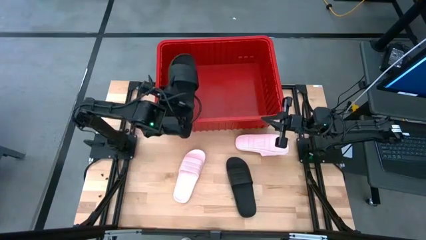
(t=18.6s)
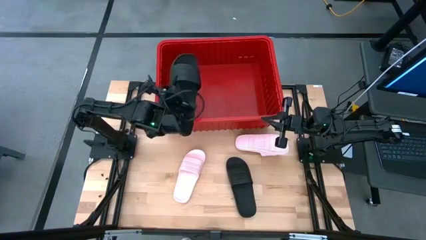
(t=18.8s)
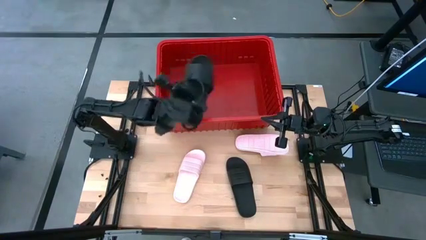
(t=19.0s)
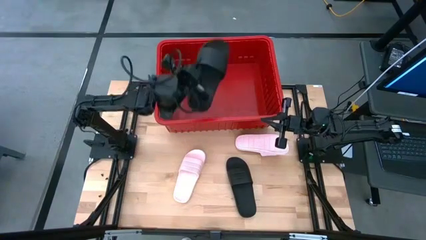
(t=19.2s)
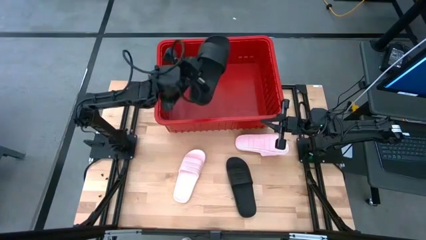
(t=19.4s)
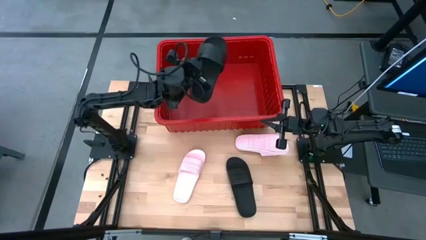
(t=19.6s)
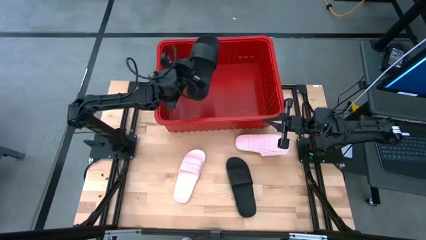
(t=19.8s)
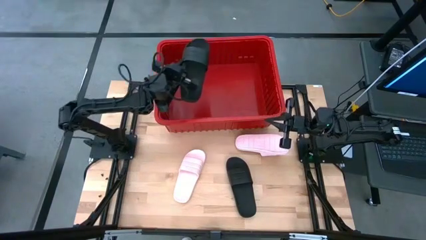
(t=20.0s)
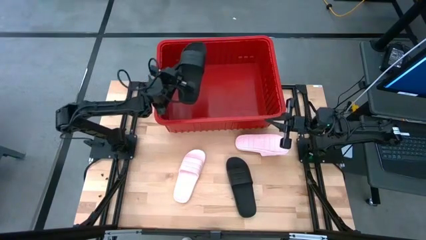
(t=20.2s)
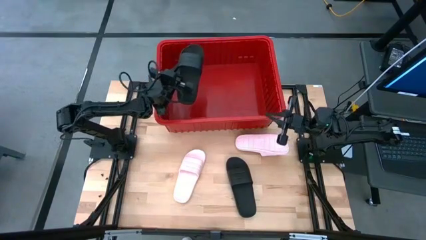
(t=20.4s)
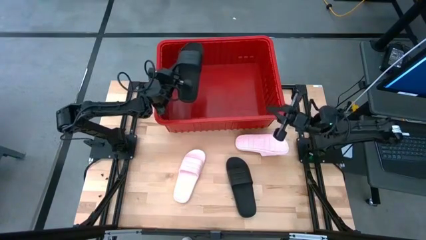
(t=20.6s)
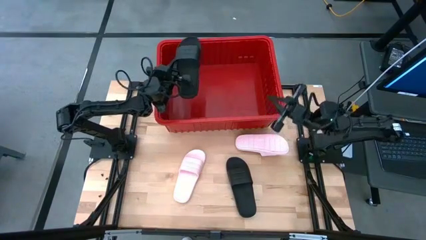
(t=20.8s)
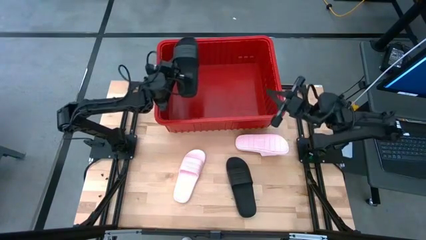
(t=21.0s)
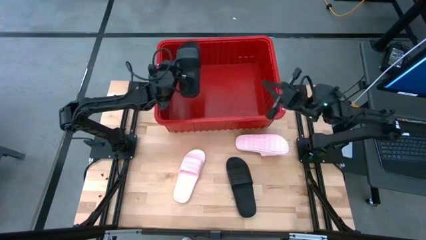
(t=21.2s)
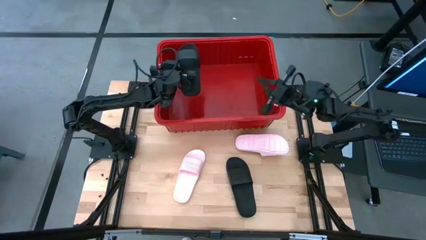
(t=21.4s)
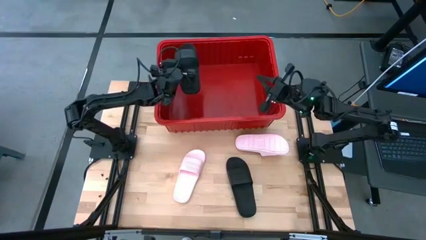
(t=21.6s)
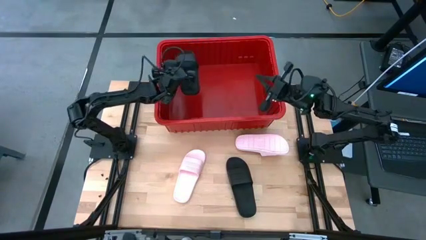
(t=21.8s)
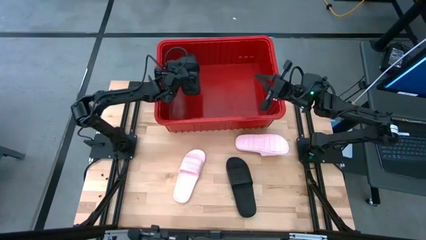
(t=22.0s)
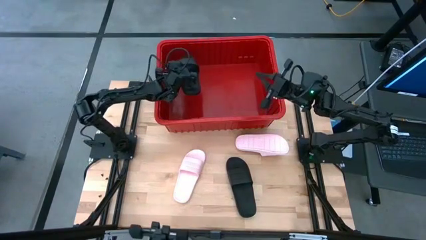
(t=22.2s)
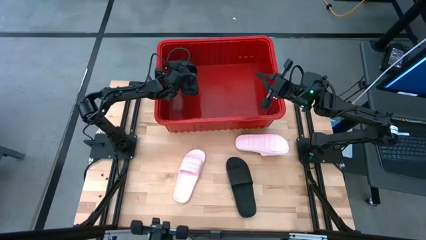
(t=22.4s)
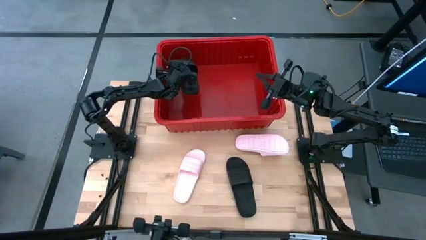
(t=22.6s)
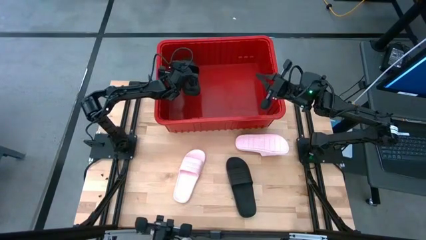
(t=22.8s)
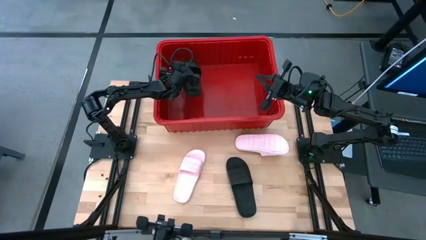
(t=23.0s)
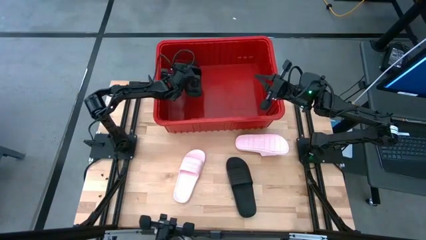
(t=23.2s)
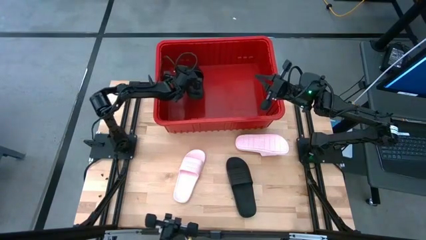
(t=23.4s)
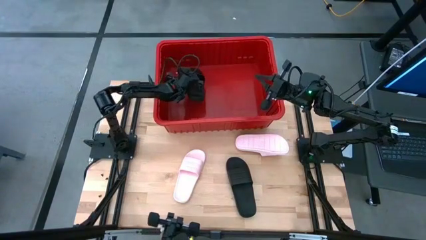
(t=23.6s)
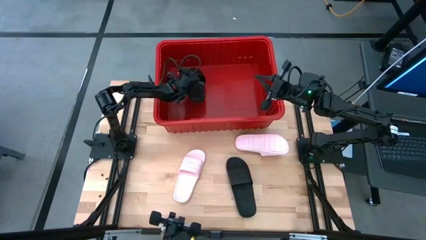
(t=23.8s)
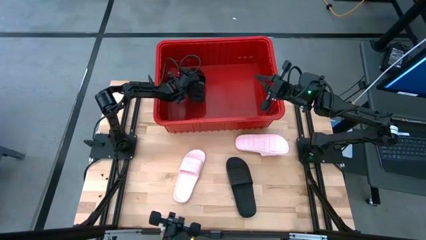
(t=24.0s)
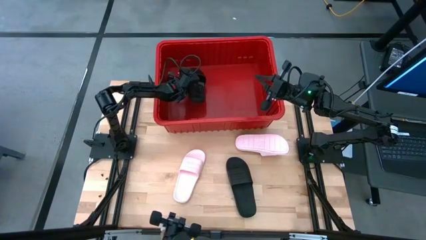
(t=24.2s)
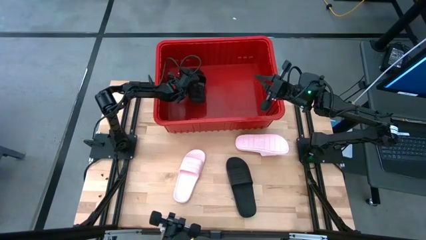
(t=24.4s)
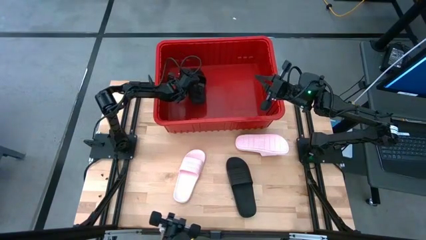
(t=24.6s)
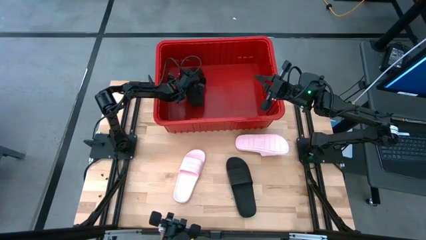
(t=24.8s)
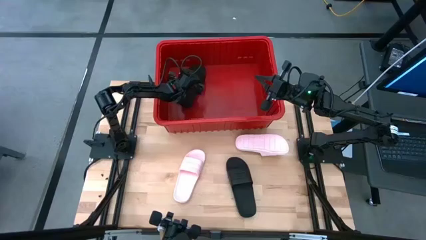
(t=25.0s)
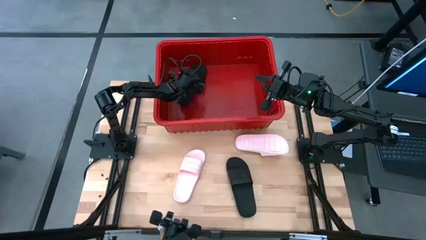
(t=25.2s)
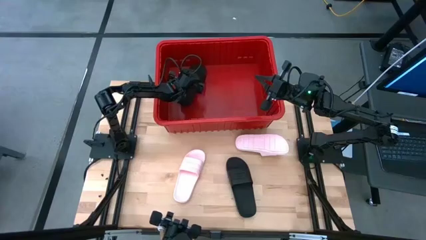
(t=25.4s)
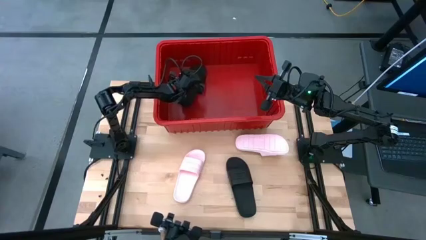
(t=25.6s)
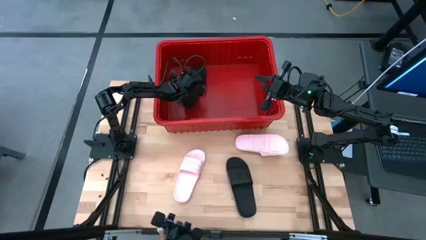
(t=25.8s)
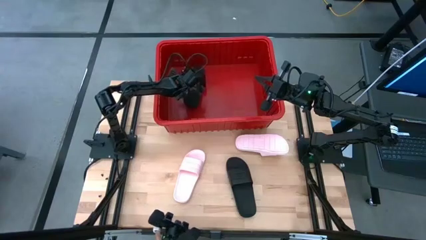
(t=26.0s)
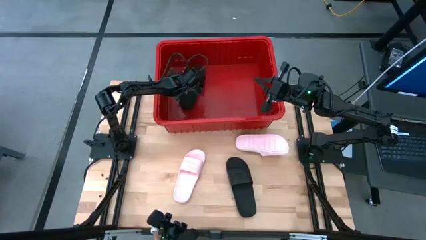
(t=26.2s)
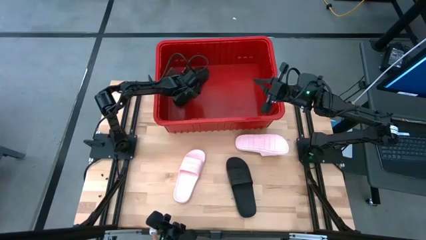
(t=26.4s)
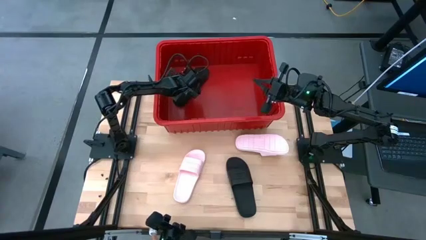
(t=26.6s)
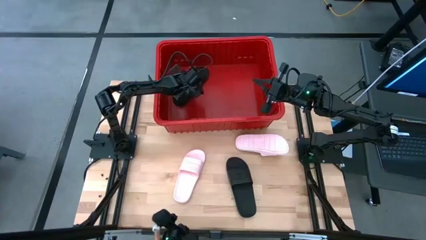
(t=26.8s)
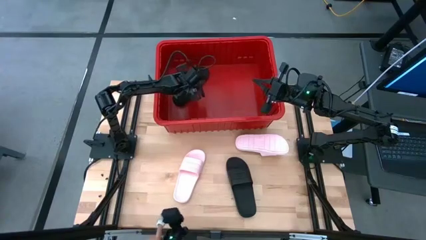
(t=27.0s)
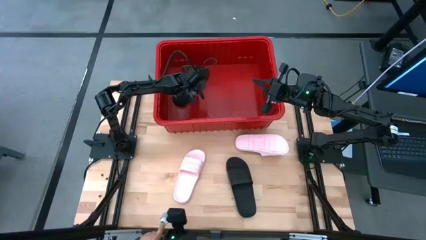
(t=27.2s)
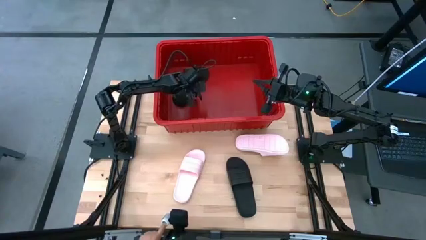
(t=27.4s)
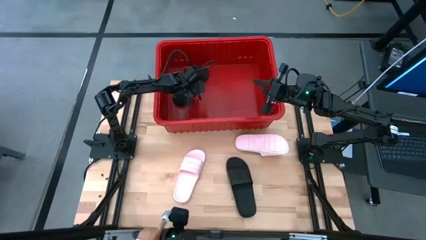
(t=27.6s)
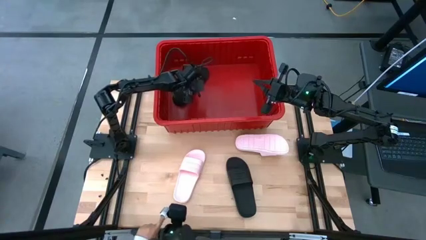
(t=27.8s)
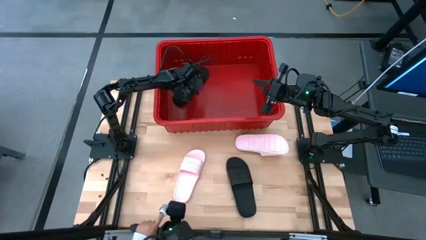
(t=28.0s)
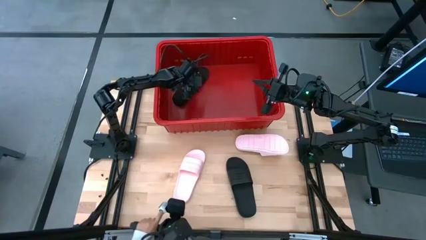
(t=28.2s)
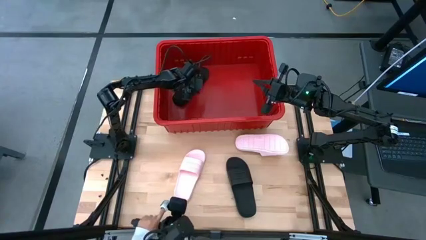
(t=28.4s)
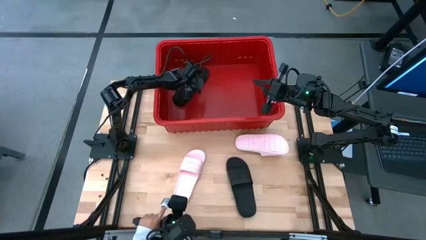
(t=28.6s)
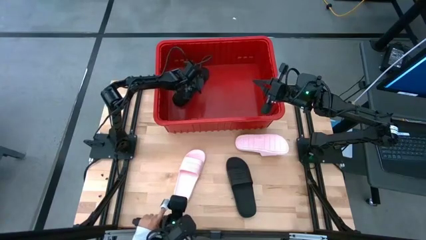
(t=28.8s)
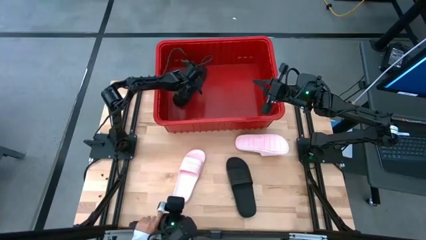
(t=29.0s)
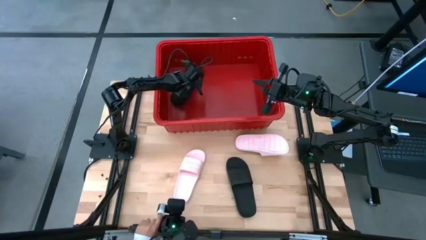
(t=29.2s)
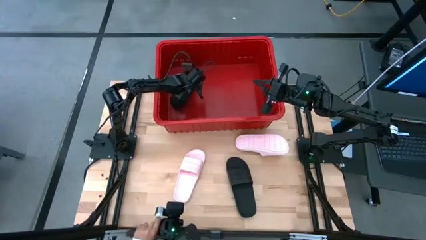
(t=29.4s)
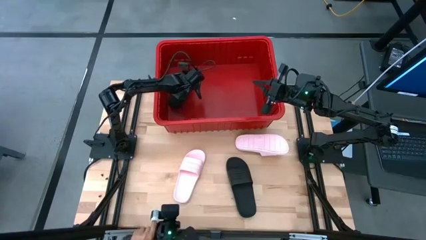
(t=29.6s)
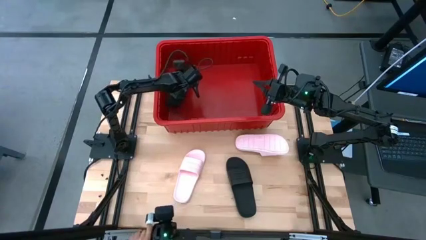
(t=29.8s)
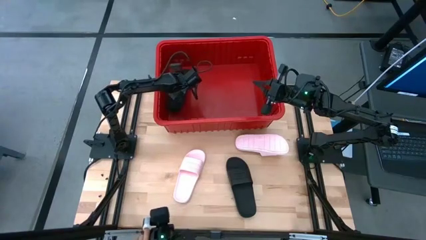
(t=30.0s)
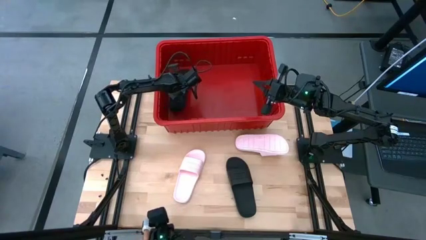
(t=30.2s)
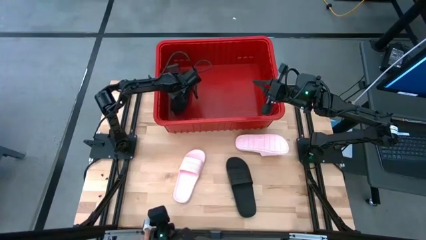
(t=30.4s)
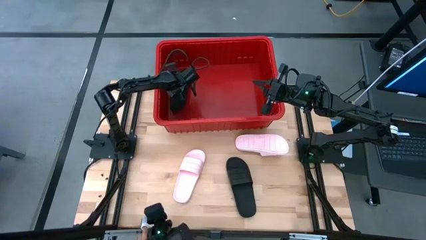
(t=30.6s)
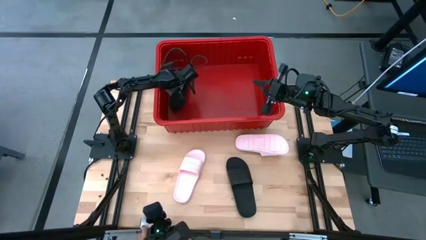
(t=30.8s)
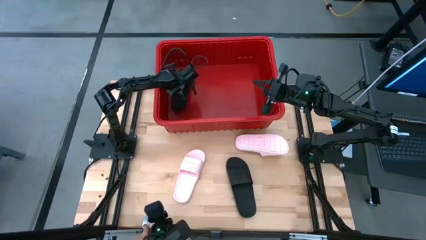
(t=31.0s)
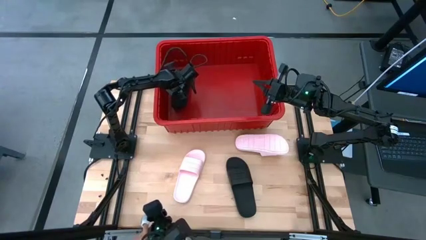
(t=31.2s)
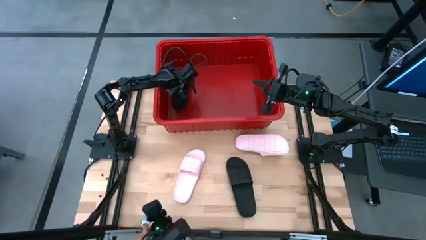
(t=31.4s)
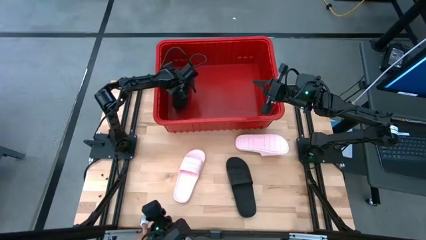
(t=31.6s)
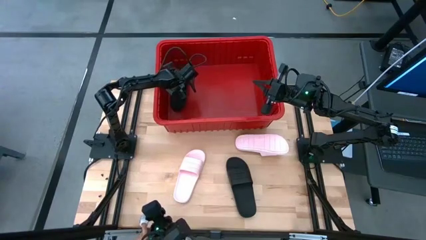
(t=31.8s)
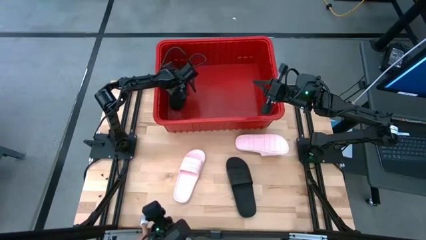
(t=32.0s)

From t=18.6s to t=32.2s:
Task: Pick and place slides into bin
Put the top black slipper into the red bin

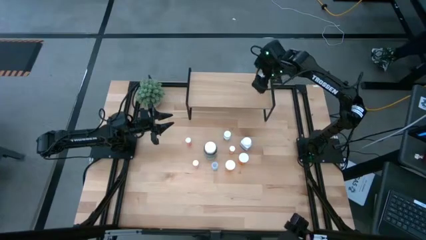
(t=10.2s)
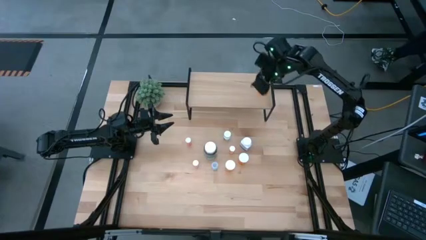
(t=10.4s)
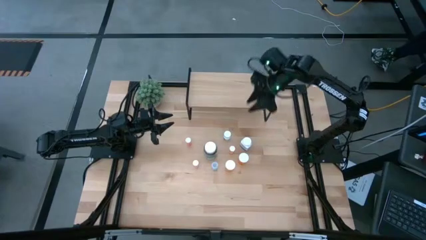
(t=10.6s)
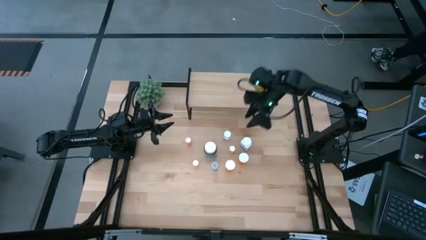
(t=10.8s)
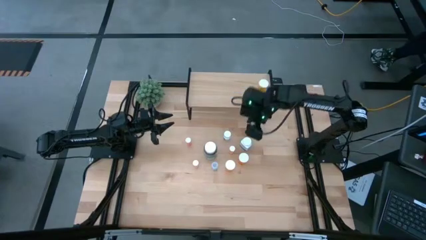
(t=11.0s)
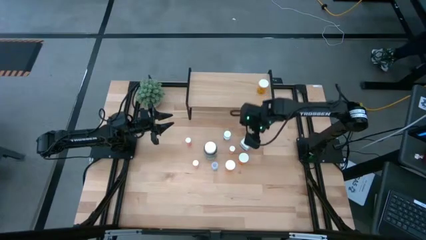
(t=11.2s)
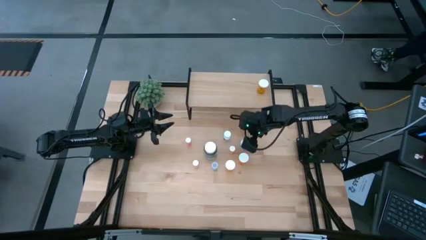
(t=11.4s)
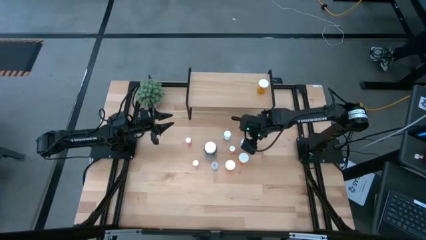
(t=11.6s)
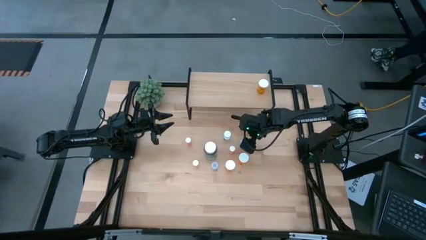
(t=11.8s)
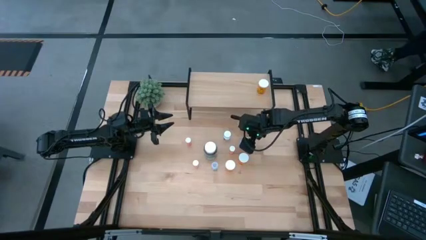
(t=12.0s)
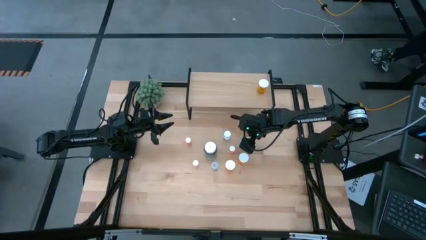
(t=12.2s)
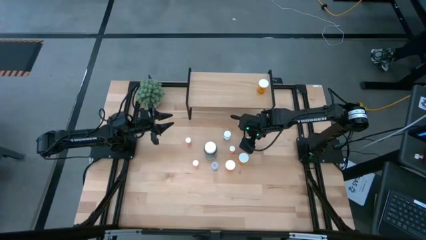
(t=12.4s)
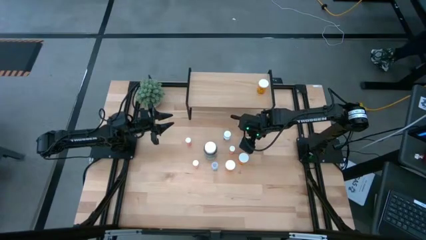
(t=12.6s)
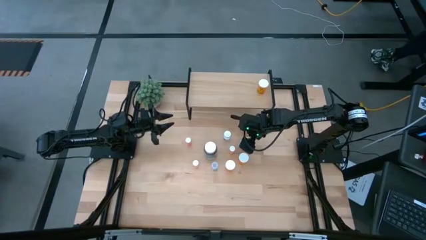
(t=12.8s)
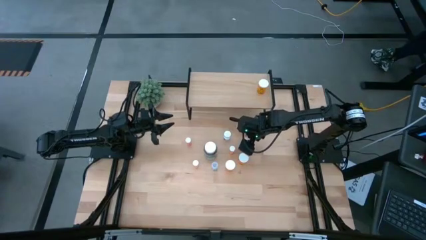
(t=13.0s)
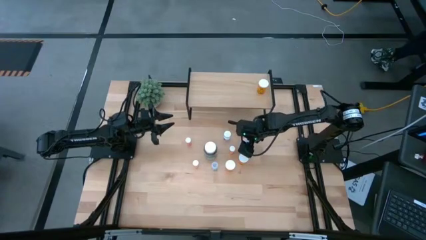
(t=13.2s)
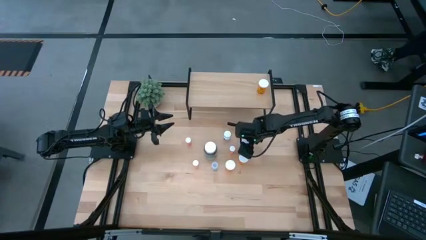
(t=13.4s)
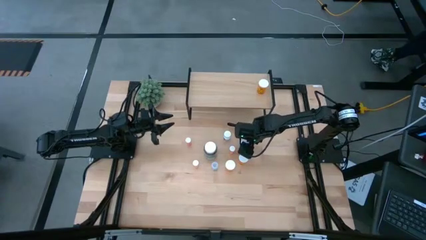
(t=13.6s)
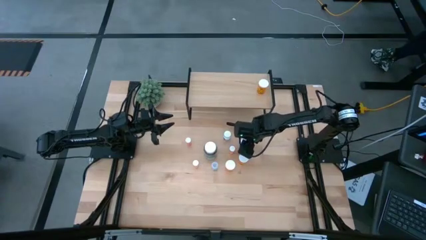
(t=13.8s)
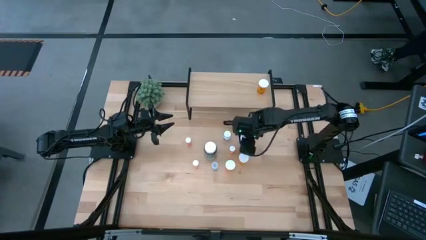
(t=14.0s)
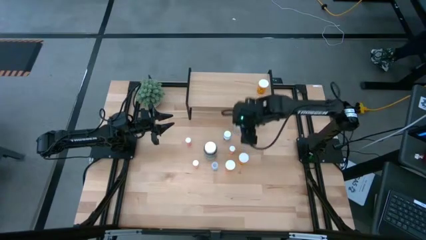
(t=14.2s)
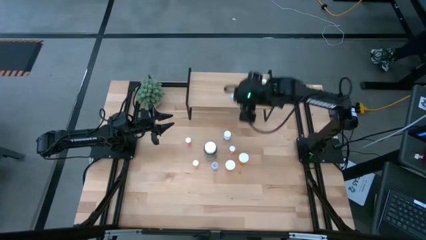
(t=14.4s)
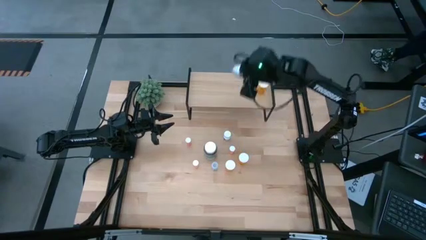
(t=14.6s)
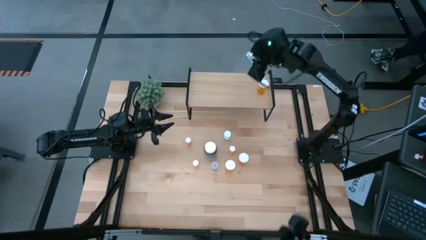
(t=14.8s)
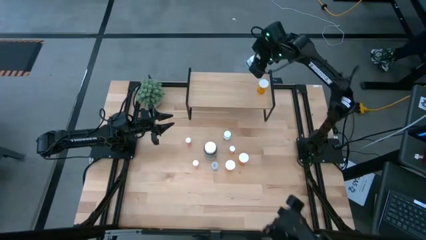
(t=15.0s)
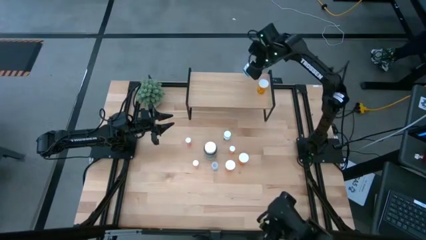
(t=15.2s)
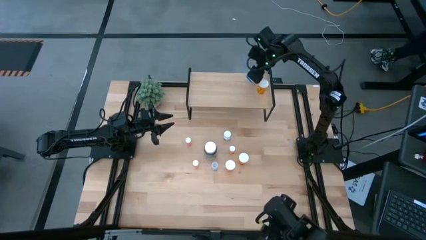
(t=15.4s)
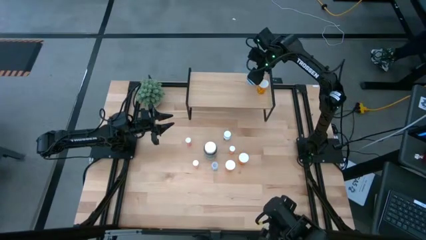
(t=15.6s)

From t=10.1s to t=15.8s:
Task: Pick and place medicine bottles onto shelf by color
Put the large white medicine bottle on the shelf
